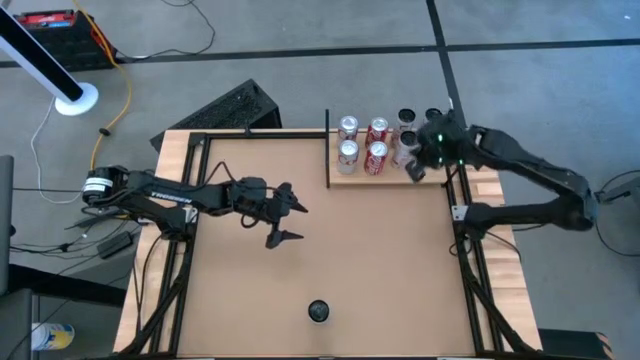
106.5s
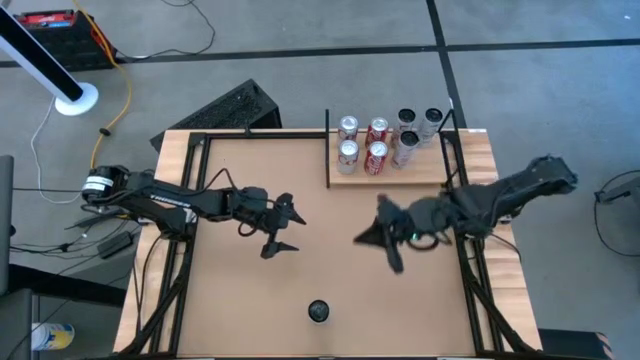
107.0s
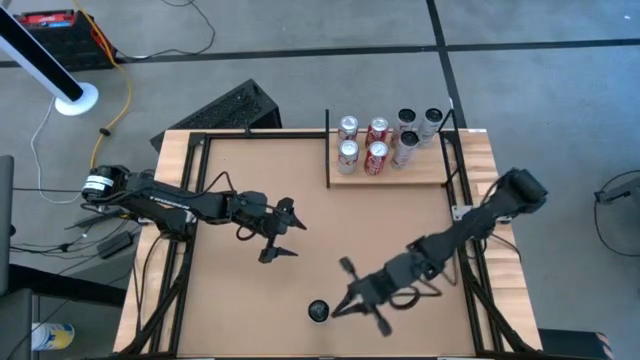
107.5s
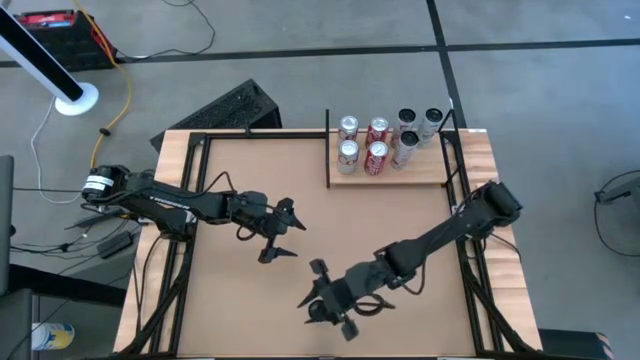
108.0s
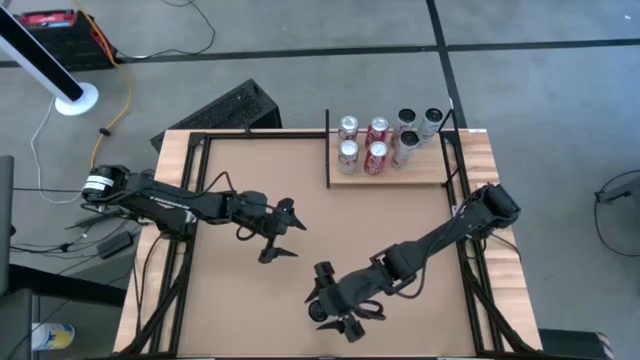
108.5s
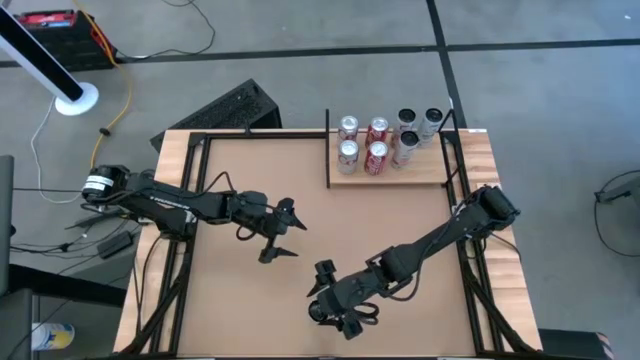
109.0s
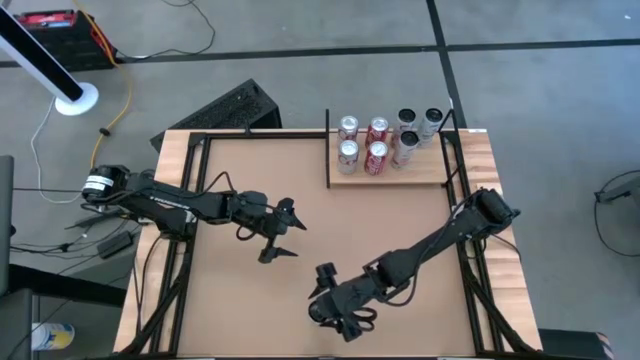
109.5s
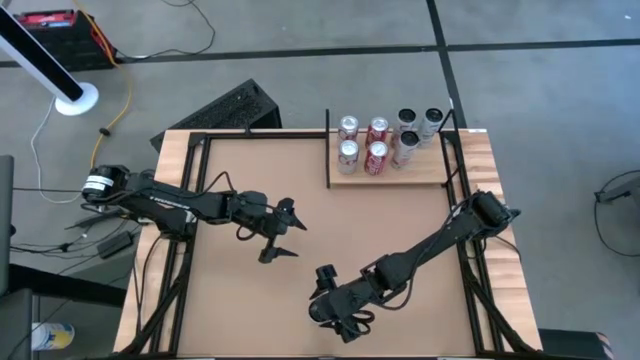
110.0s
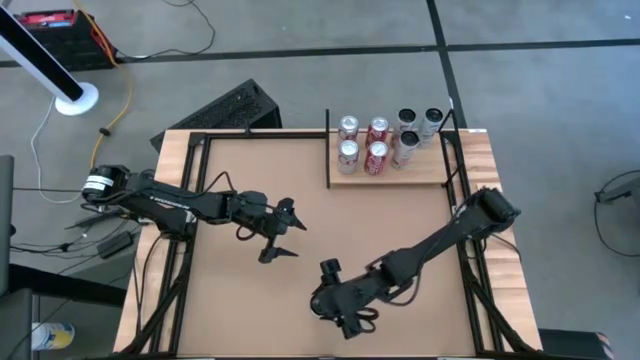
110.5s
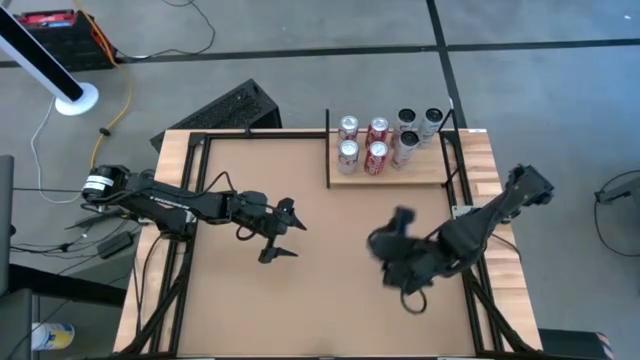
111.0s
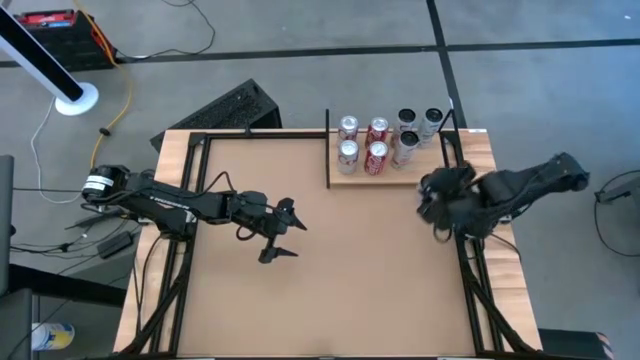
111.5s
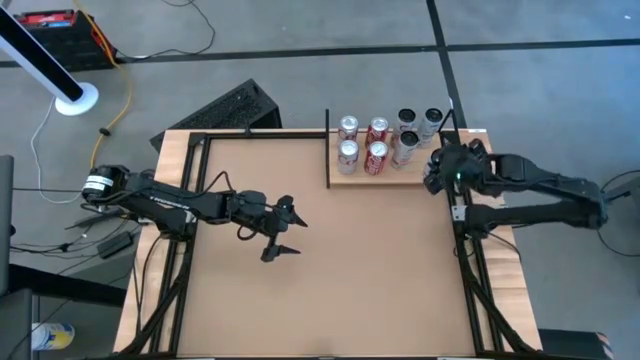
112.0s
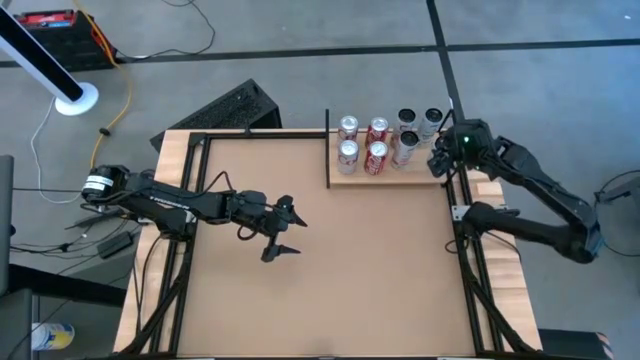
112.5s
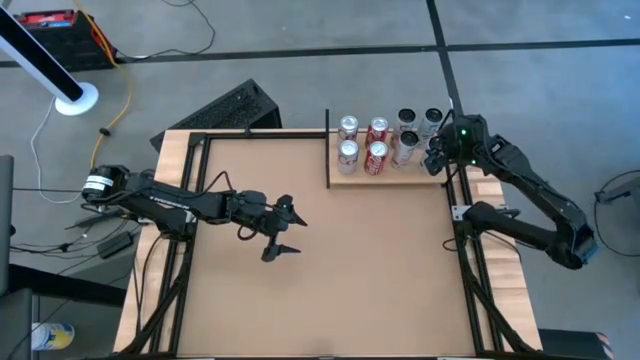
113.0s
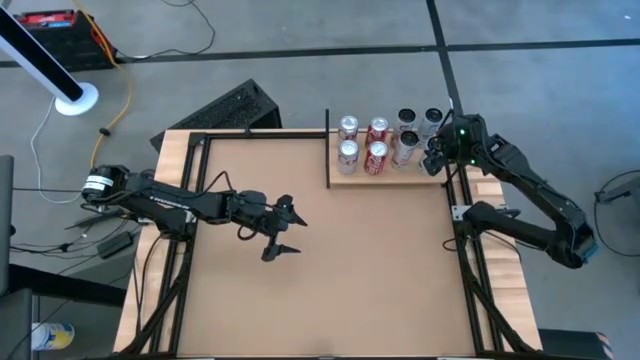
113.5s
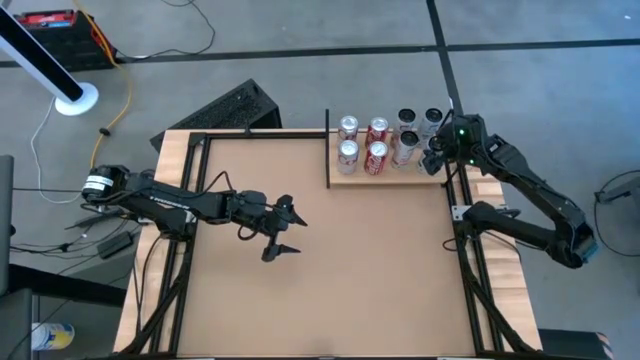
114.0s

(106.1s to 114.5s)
Task: Place canned beverage on shelf
Put the white-blue soda can on the shelf aligned with the other white-blue soda can

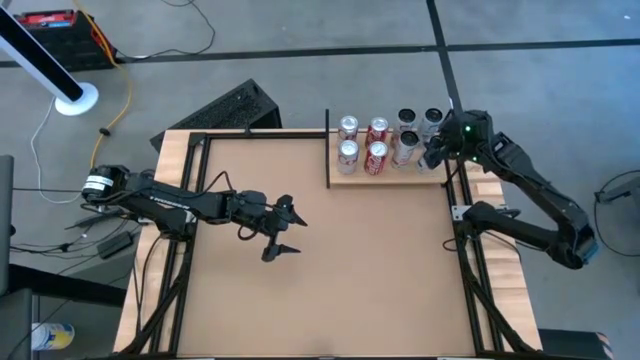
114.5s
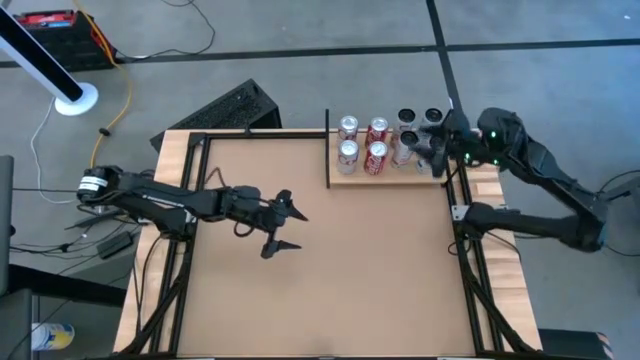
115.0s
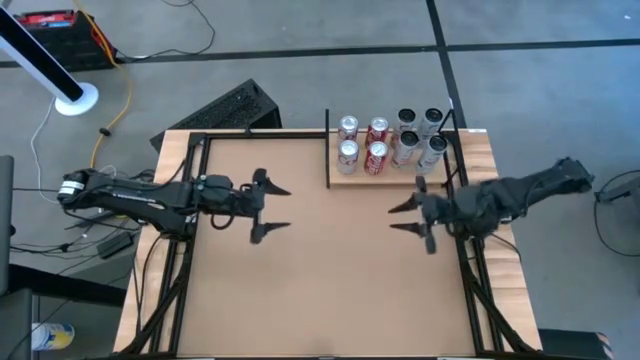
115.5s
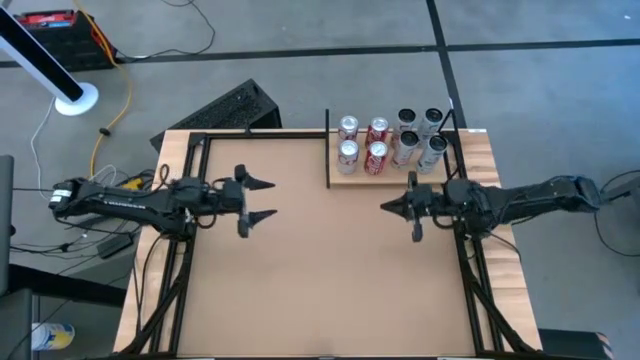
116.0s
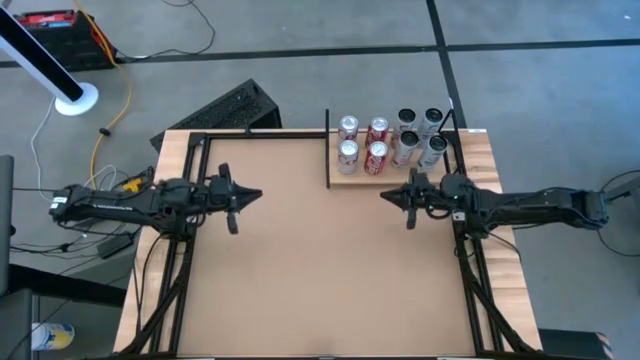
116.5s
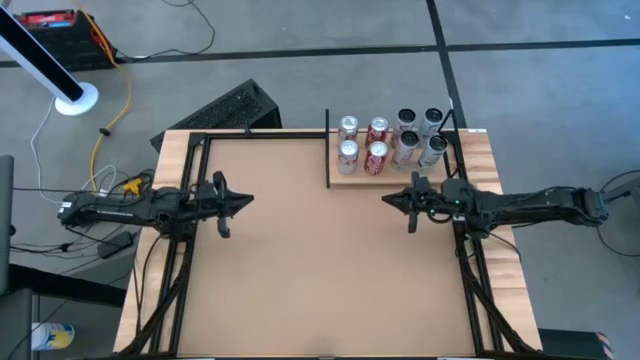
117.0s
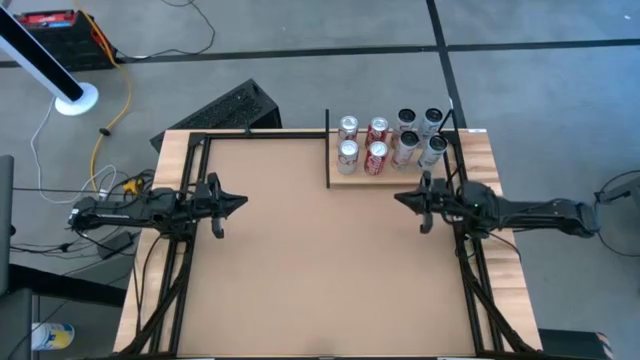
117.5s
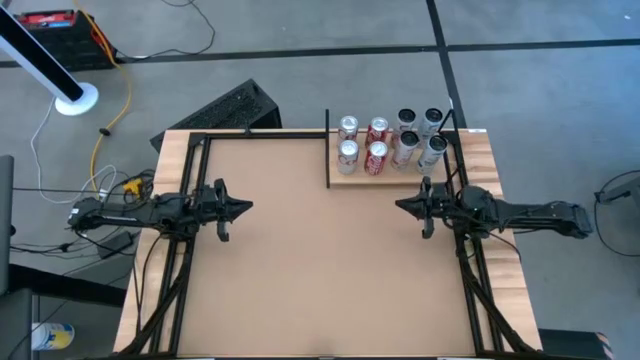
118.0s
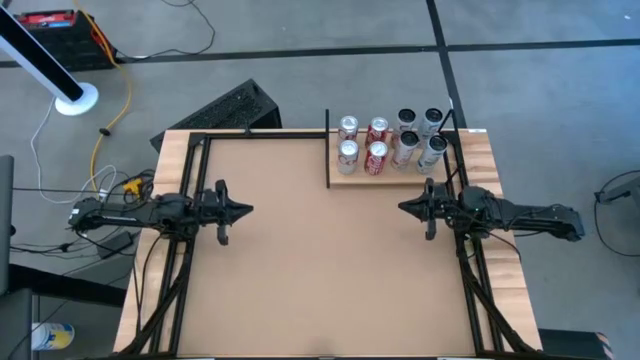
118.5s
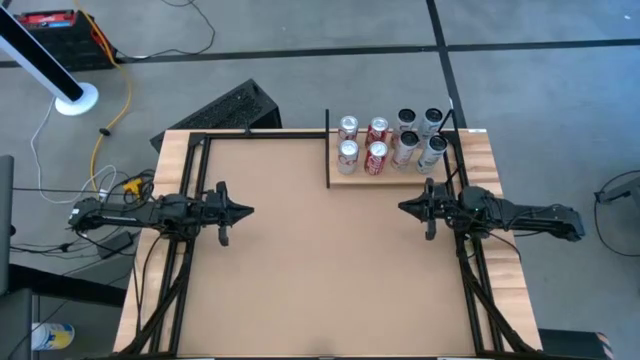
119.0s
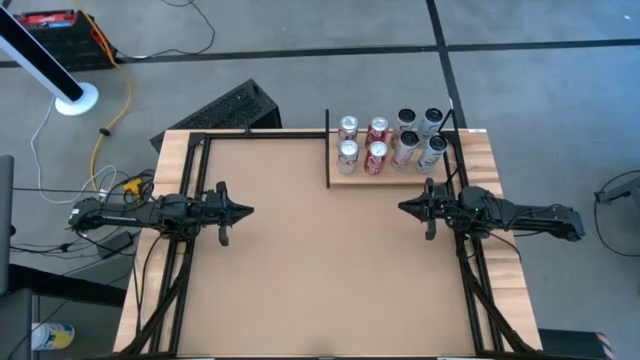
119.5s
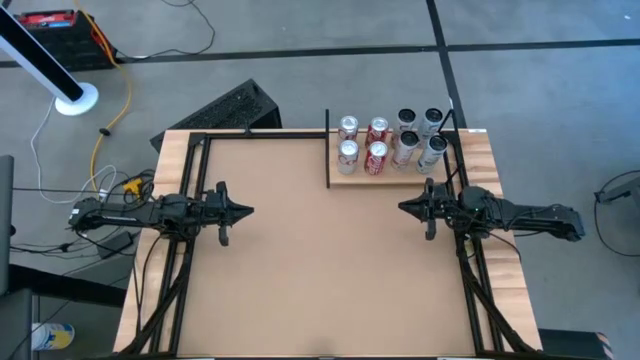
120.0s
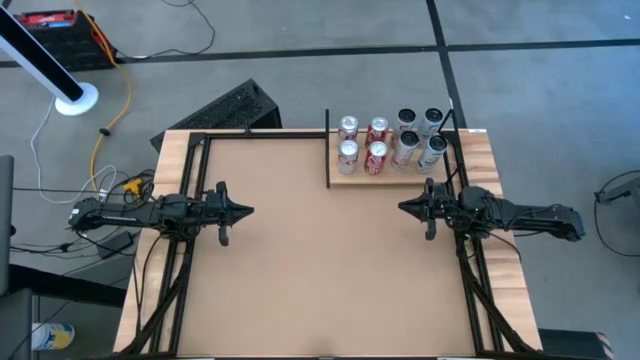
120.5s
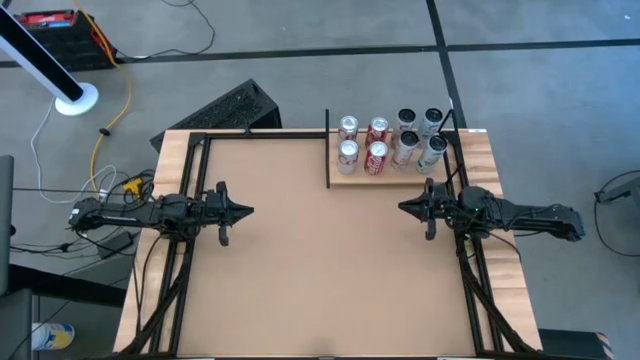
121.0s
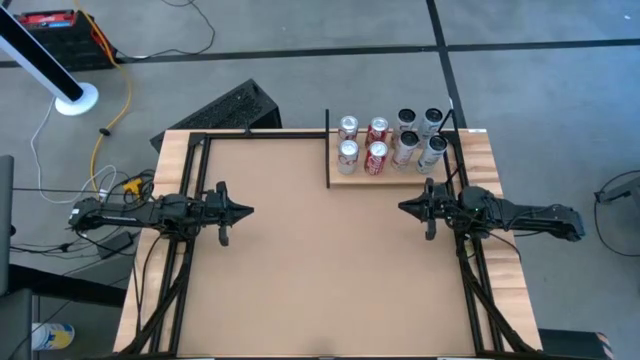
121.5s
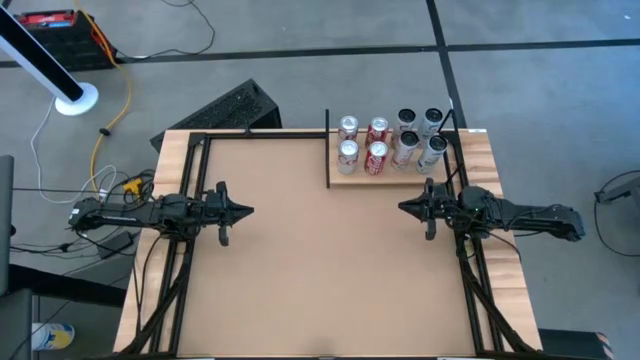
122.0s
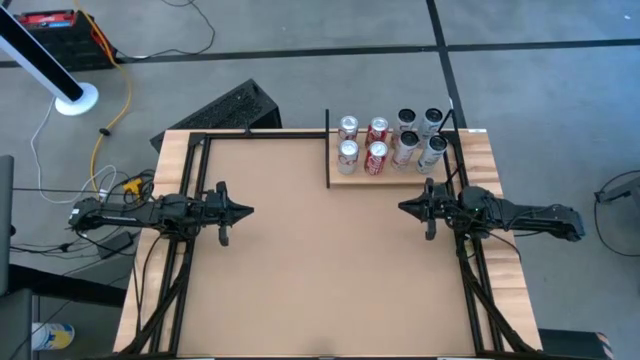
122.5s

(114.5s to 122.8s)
Return to Home Position

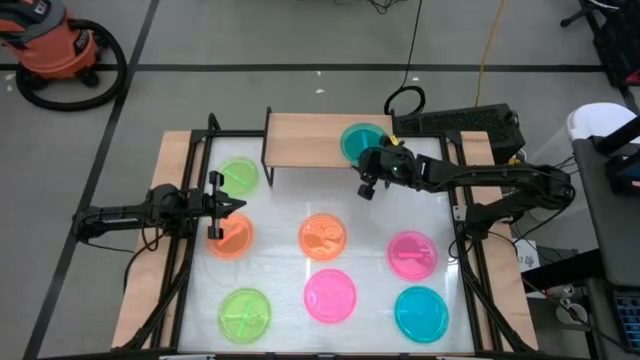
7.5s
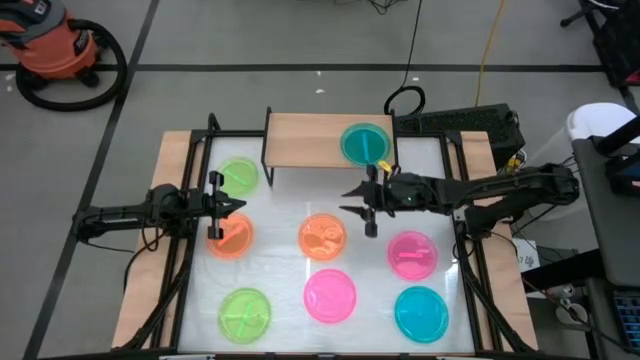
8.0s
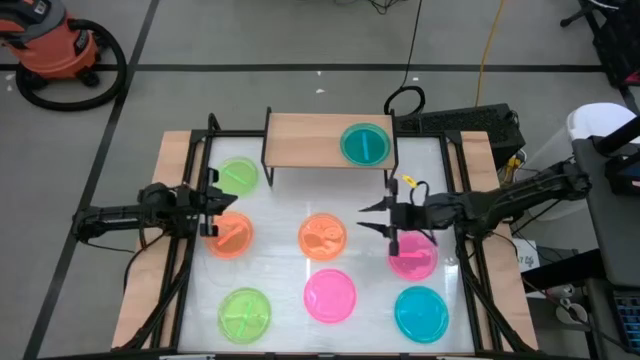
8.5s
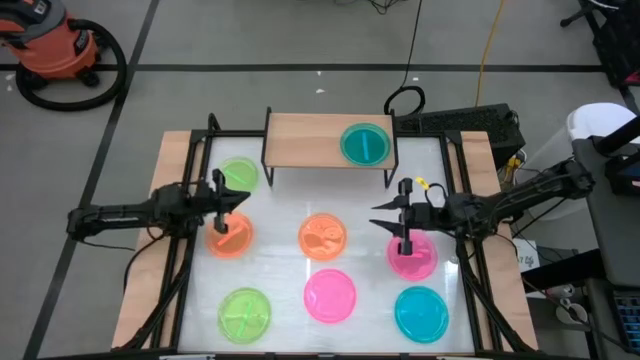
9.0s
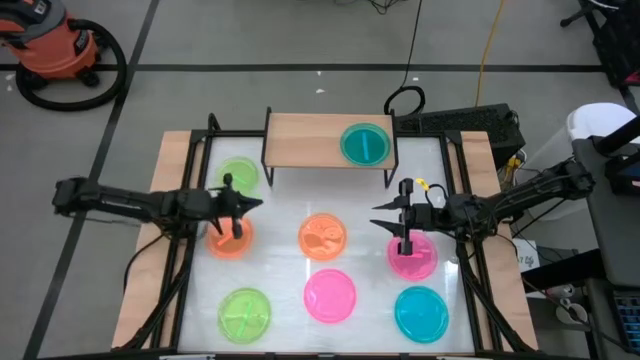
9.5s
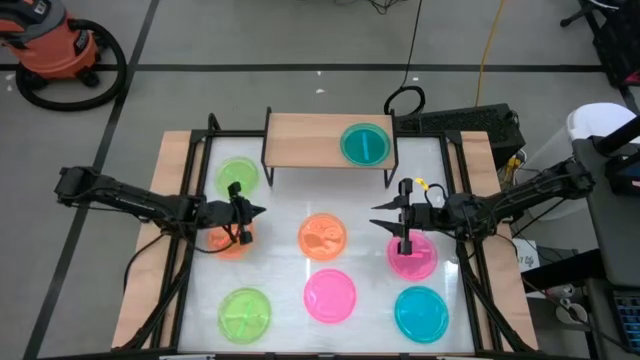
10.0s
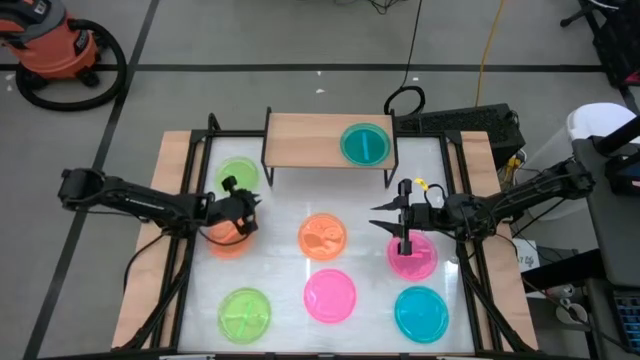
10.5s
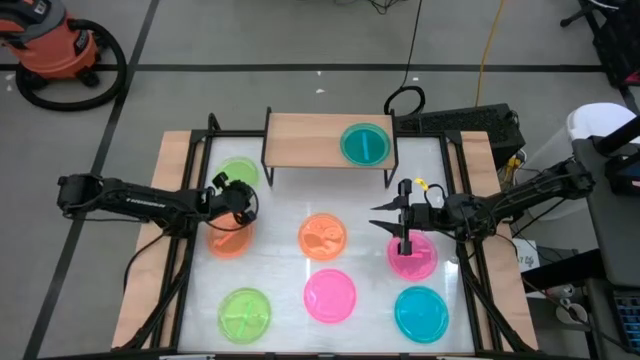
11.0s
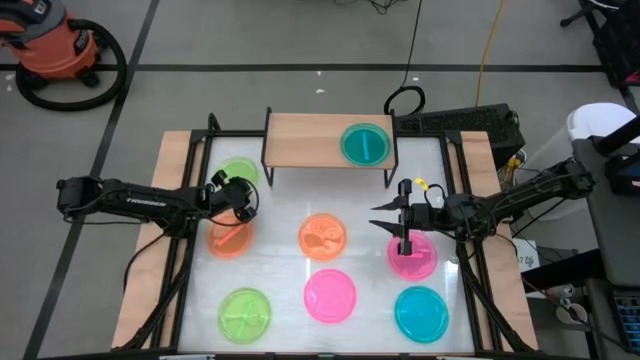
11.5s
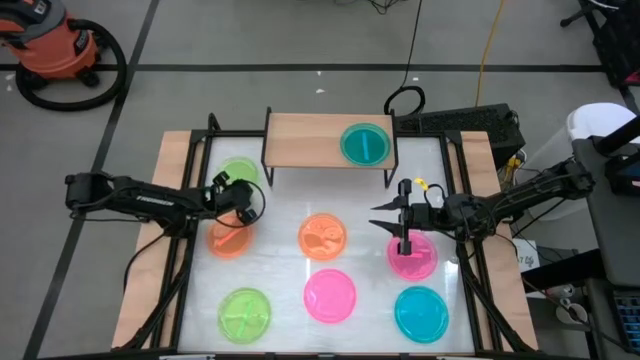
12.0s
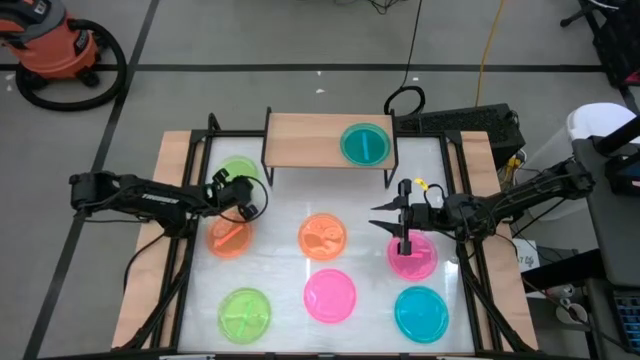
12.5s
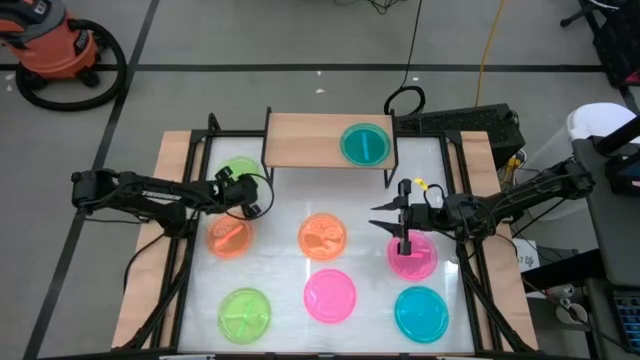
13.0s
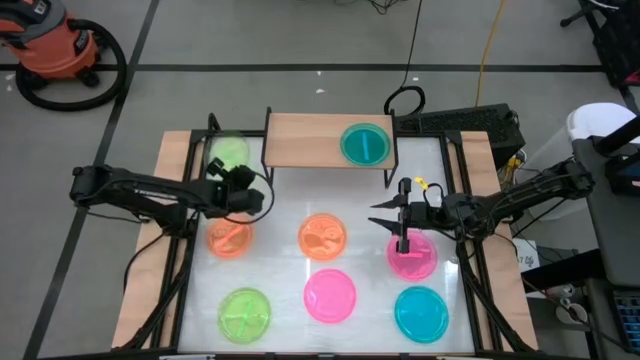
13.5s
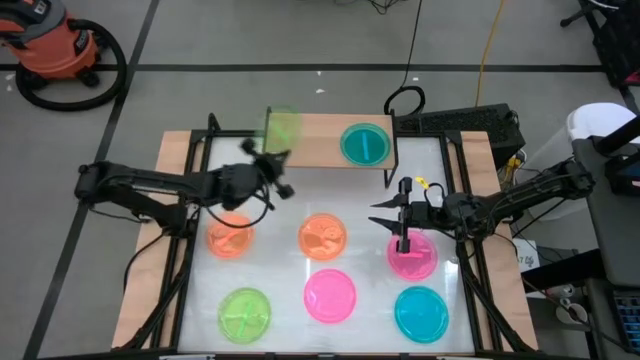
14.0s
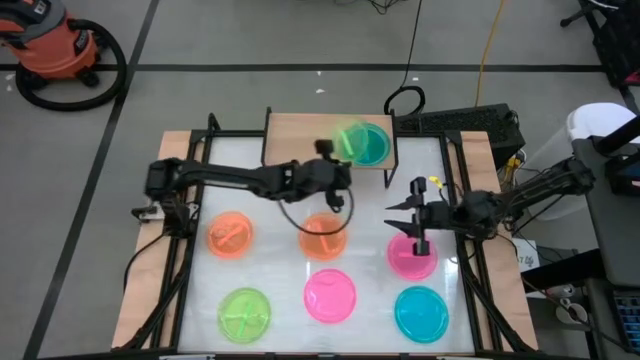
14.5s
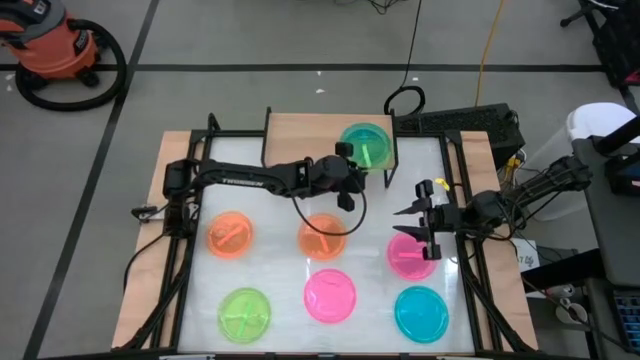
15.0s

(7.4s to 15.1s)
Task: Place and stack plates onto a shelf
Stack the top green plate on top of the blue plate on the shelf
